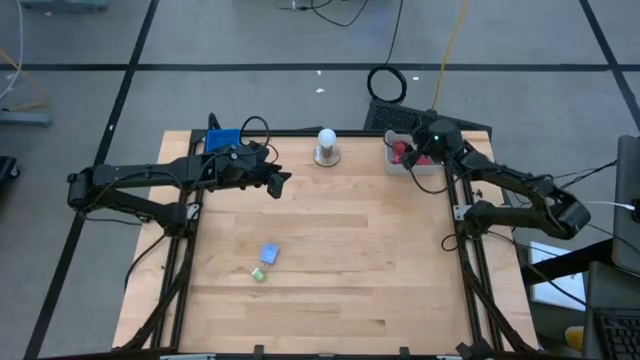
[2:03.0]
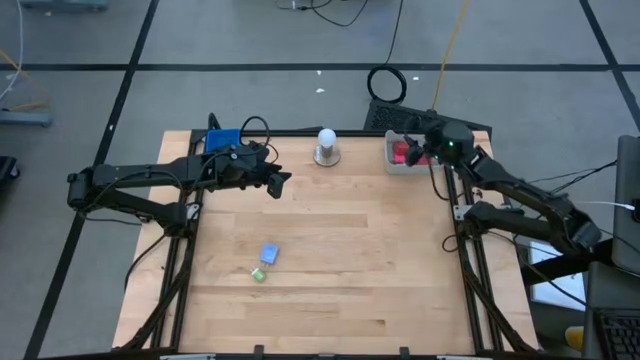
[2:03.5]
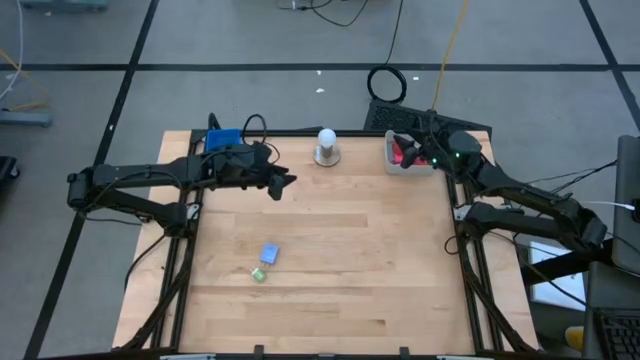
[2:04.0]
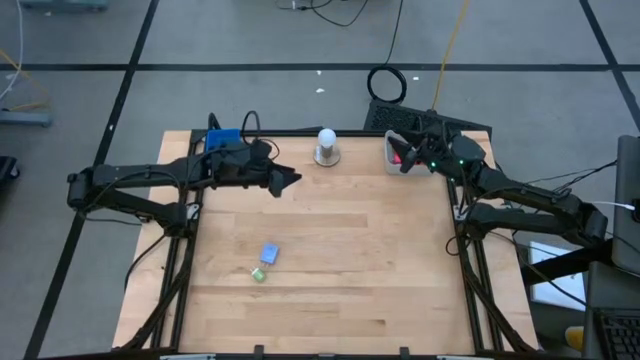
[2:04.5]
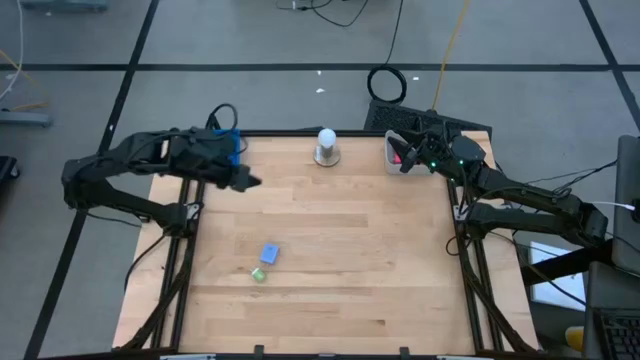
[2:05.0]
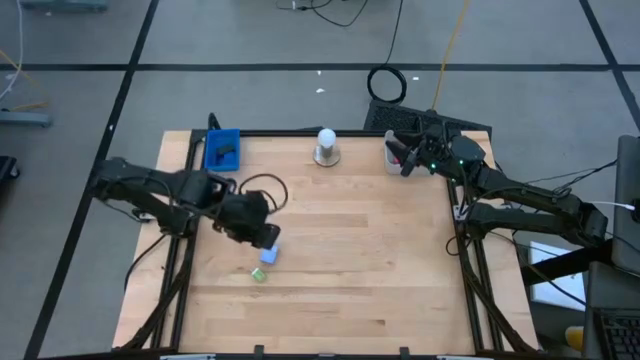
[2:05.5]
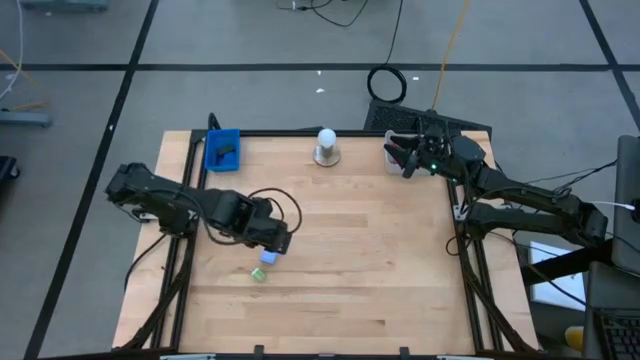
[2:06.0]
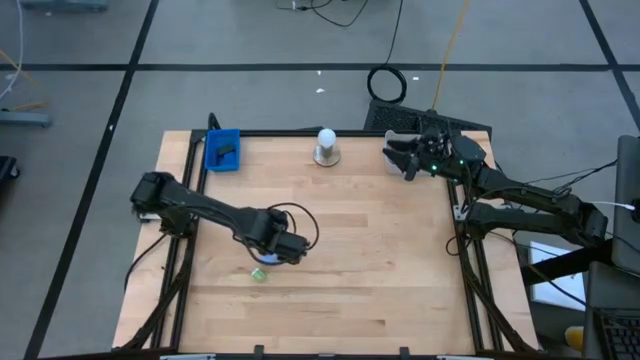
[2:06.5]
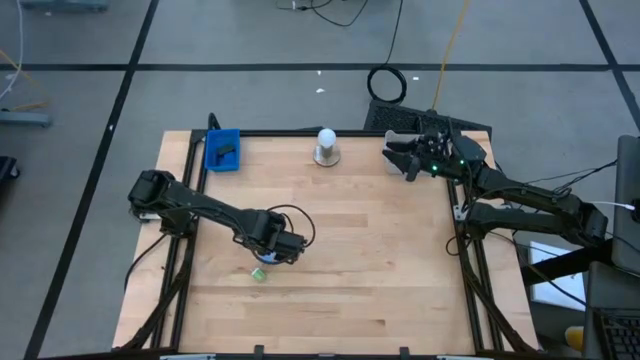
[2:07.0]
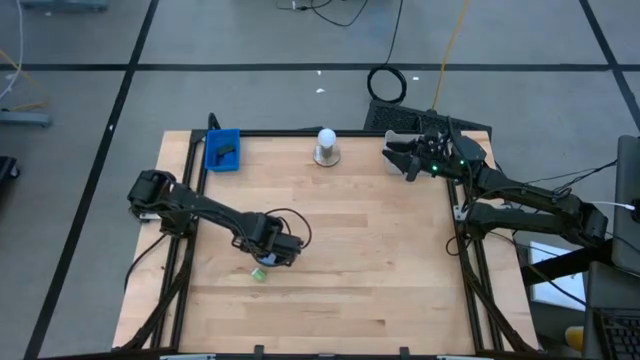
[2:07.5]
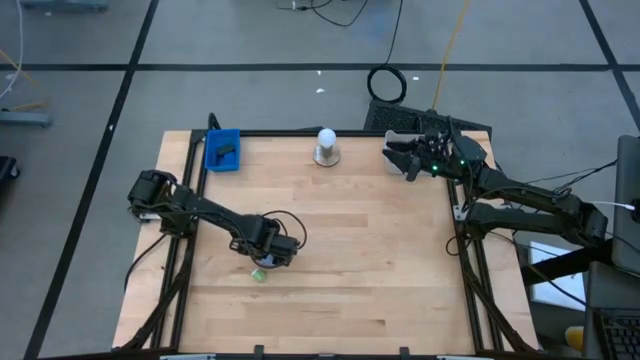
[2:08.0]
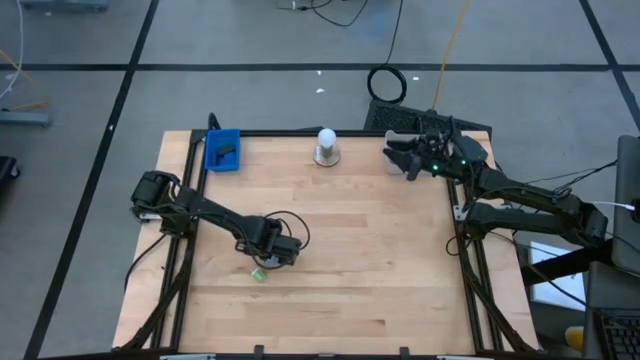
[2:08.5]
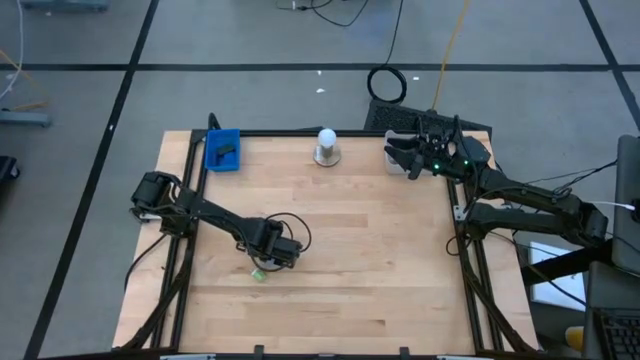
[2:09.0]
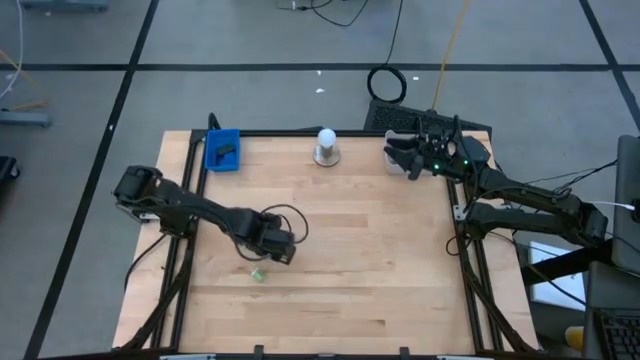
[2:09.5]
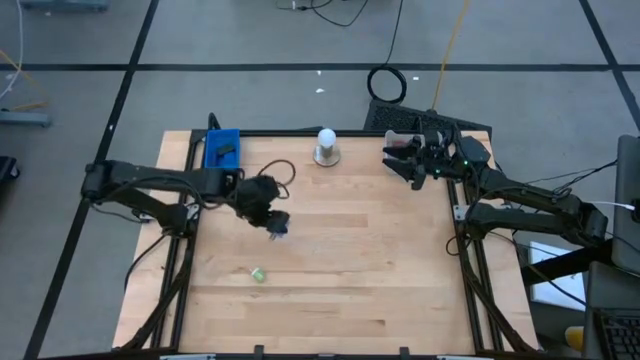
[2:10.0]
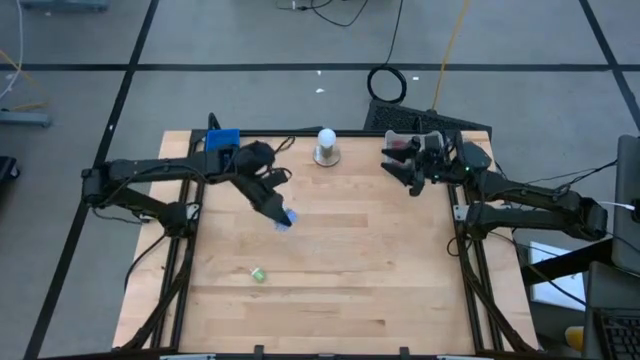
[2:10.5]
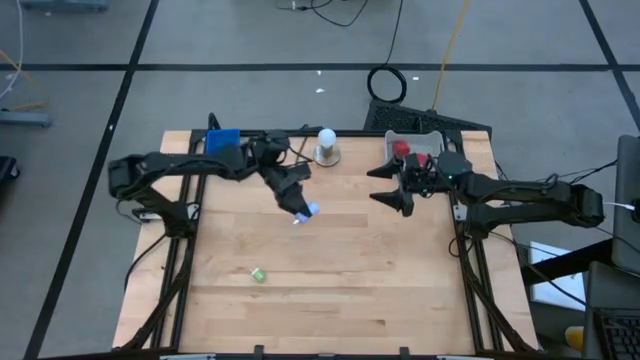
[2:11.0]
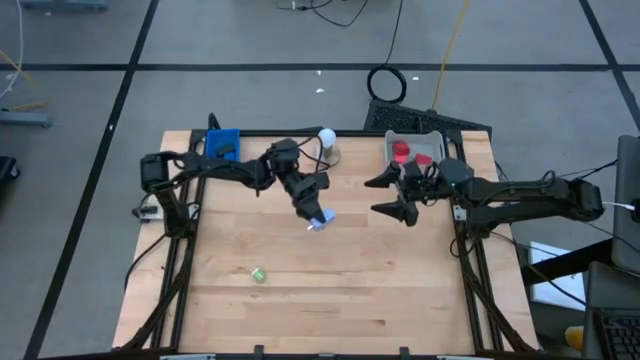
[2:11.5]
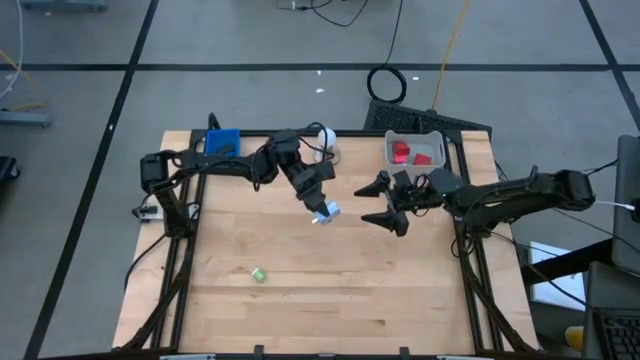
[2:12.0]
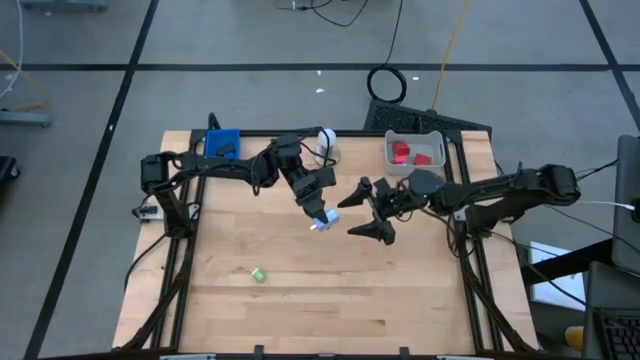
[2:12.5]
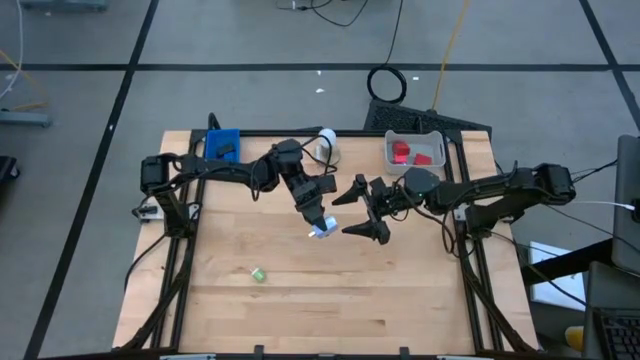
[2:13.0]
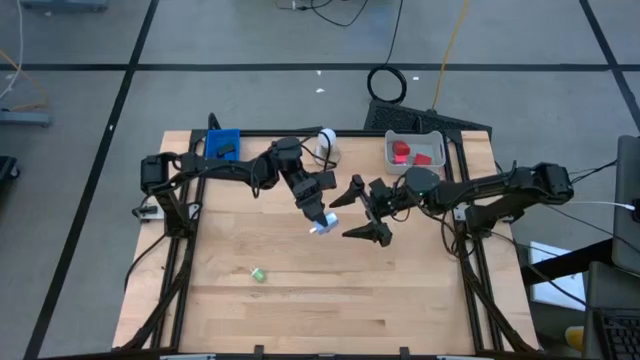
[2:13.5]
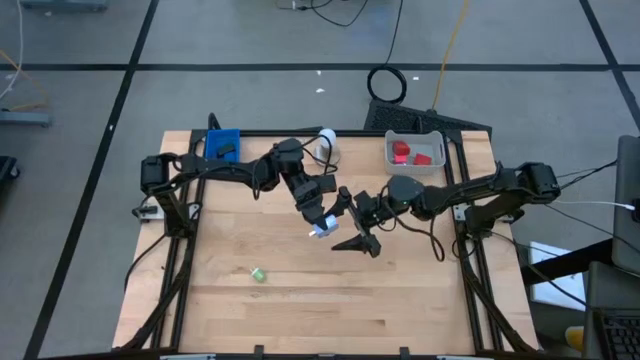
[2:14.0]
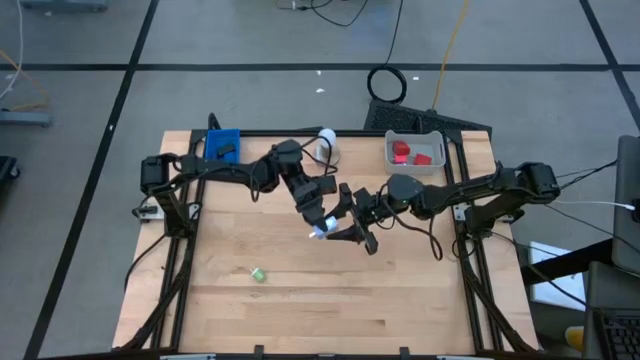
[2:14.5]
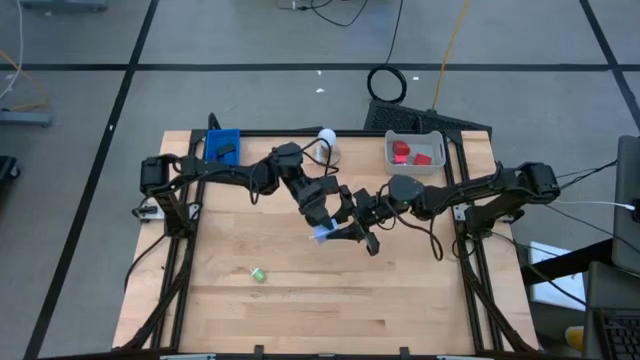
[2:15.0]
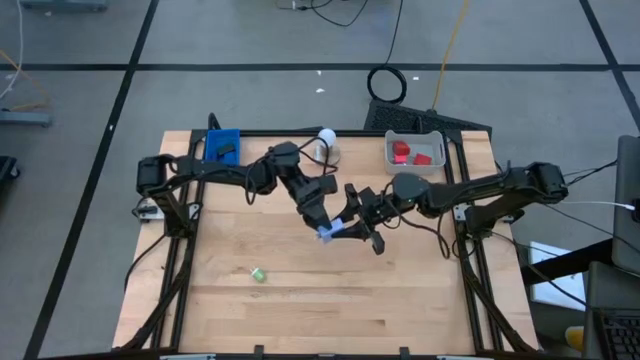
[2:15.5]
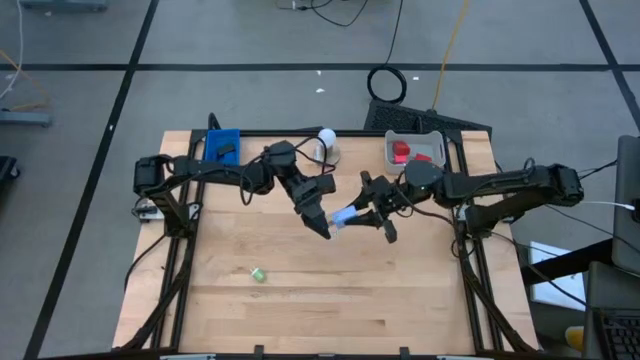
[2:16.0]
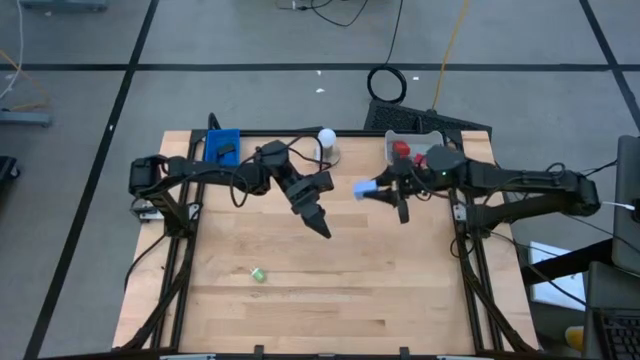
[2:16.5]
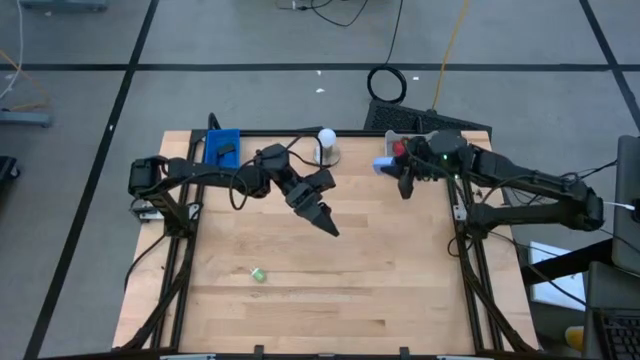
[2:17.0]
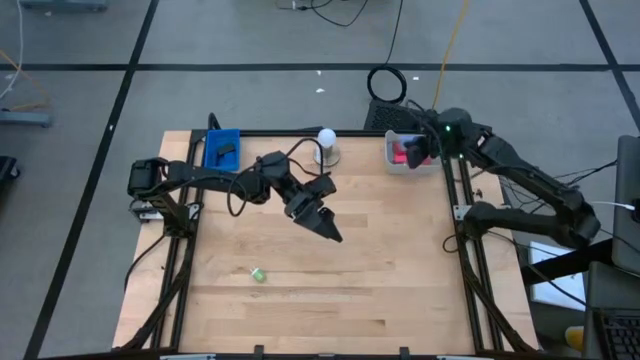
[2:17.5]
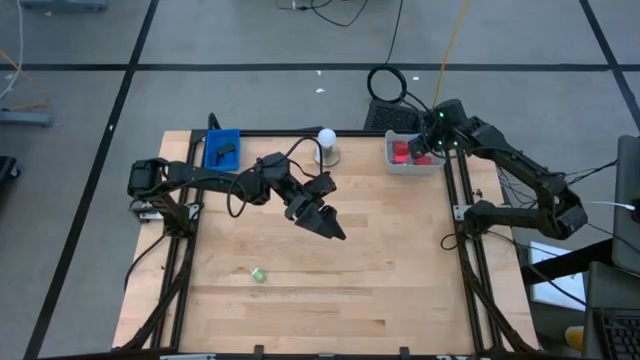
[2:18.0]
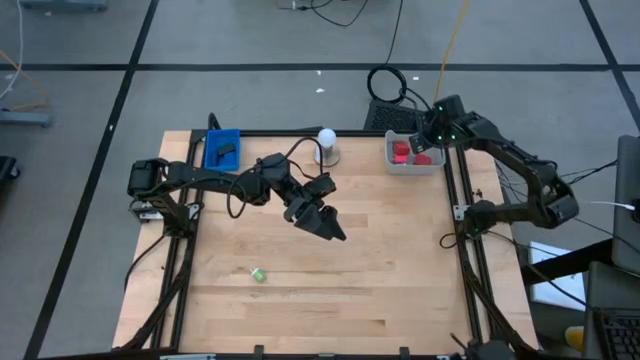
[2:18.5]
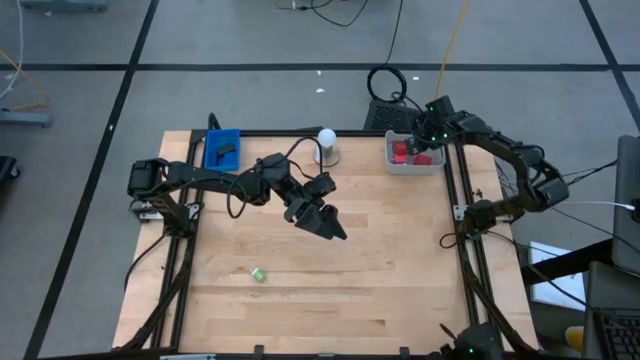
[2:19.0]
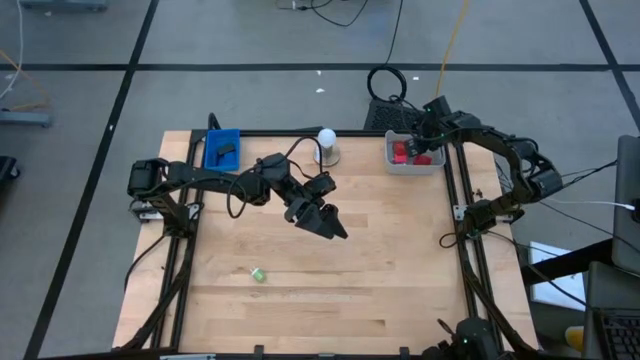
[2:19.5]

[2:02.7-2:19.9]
Task: Pick & Place Office items
Put the blue charger adapter into the gray bin

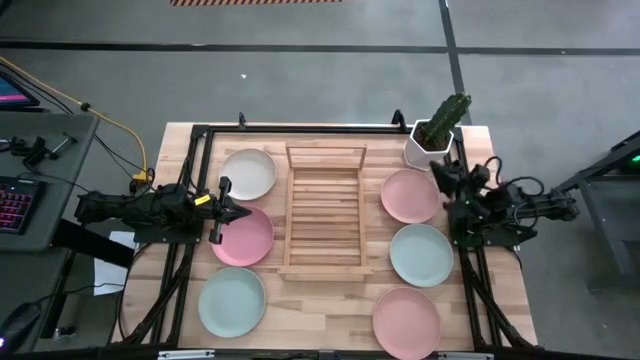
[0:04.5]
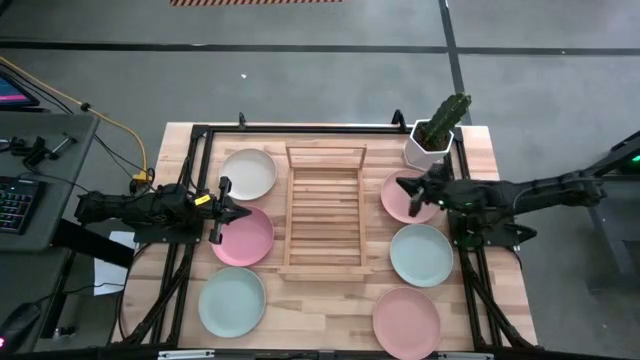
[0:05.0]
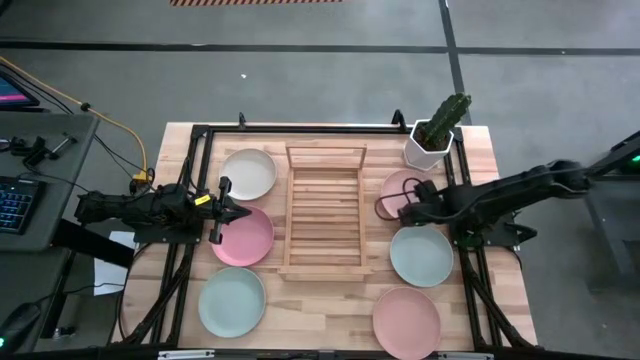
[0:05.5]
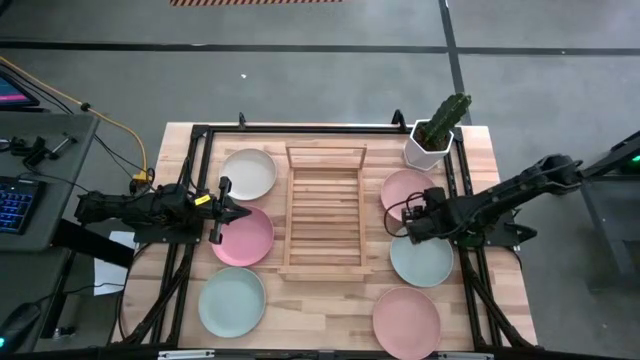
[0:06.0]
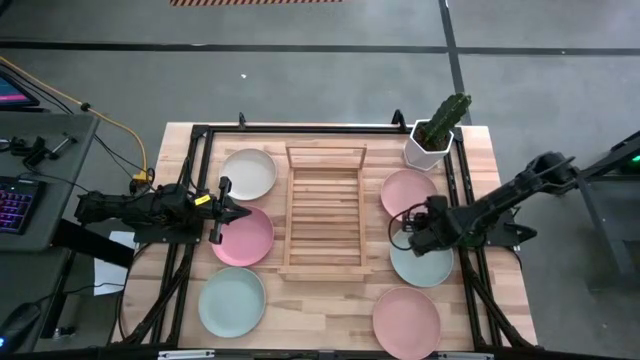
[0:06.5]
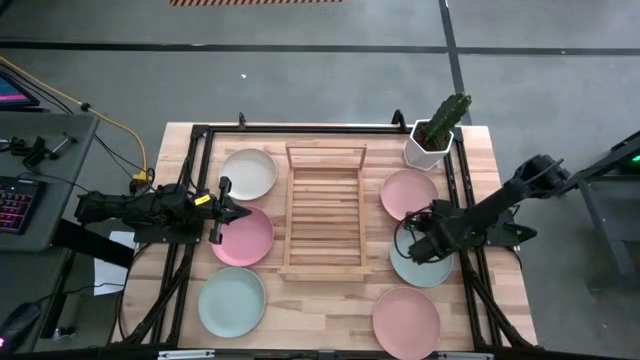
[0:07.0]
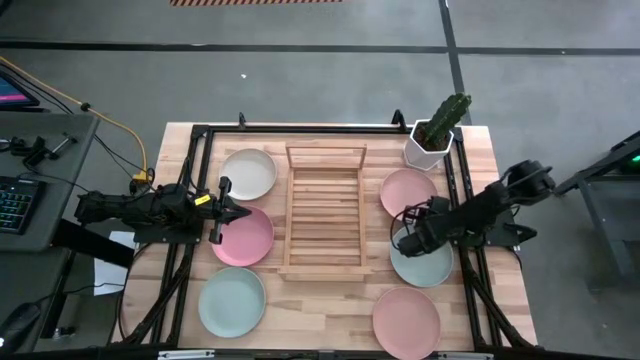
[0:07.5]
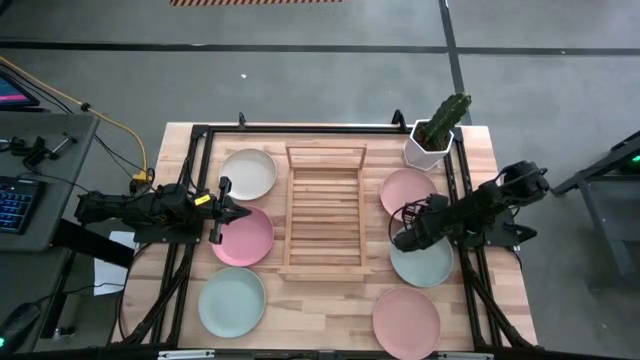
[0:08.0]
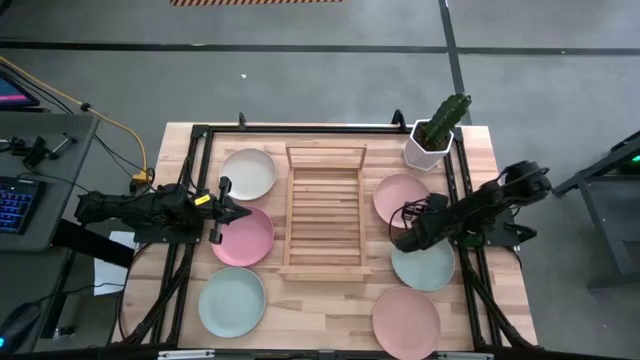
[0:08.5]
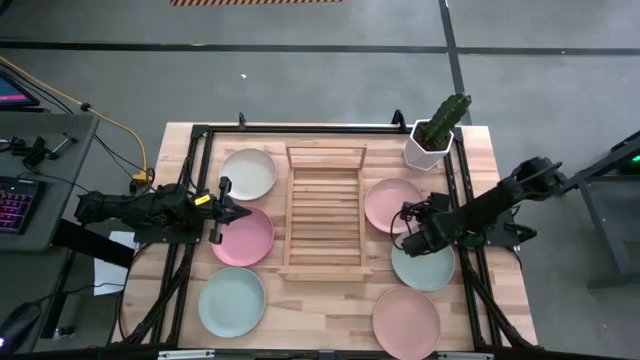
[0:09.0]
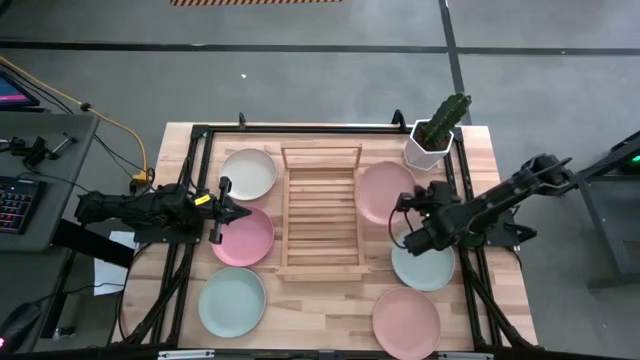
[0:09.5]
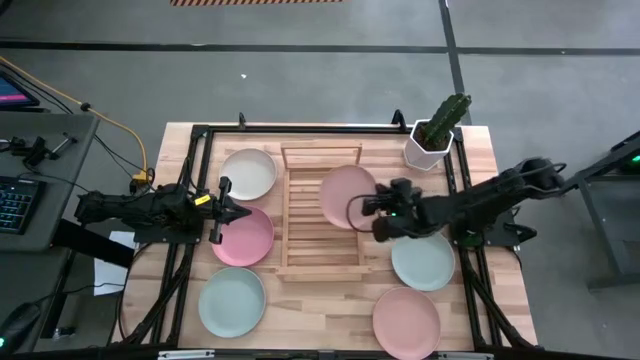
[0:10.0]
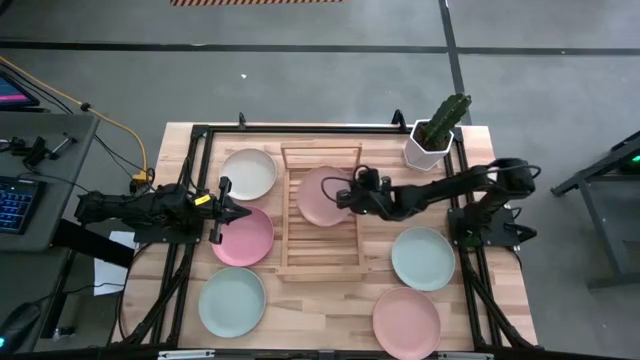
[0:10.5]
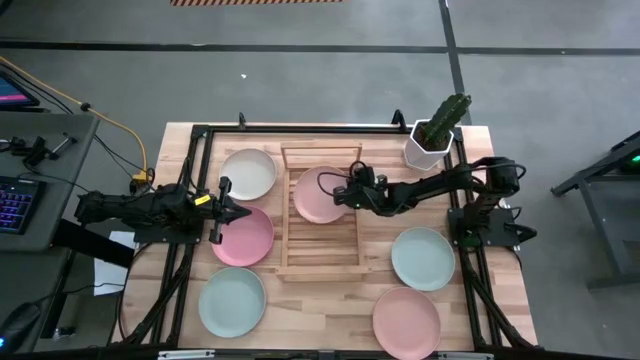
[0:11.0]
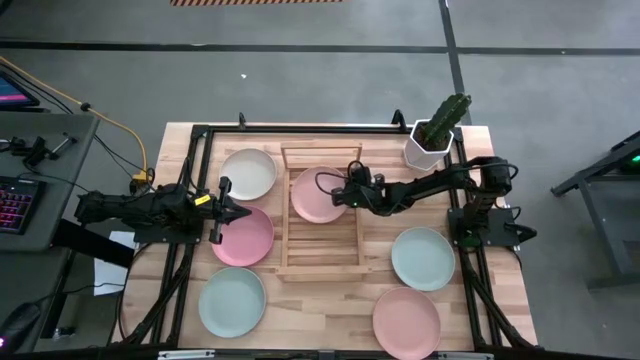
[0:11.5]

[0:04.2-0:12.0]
Task: Place and stack plates onto a shelf
Put the top light pink plate on the shelf
